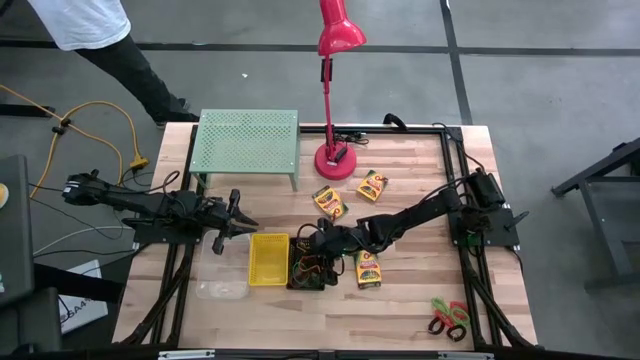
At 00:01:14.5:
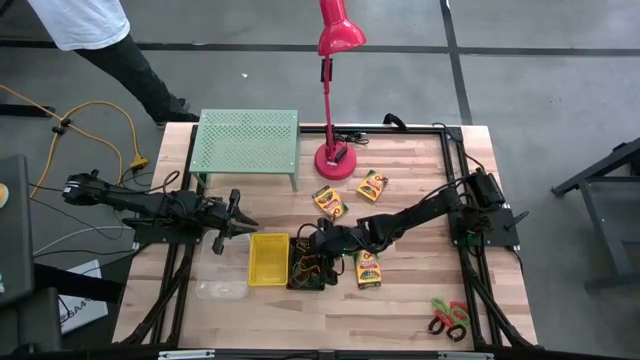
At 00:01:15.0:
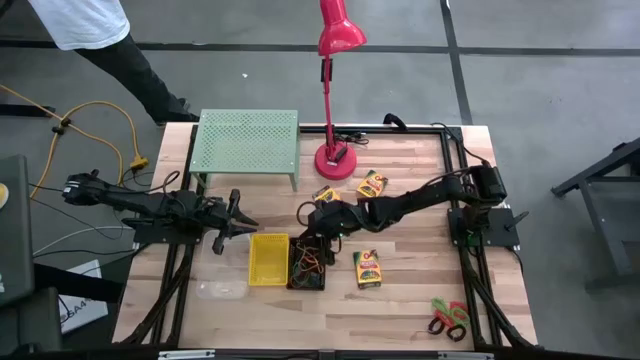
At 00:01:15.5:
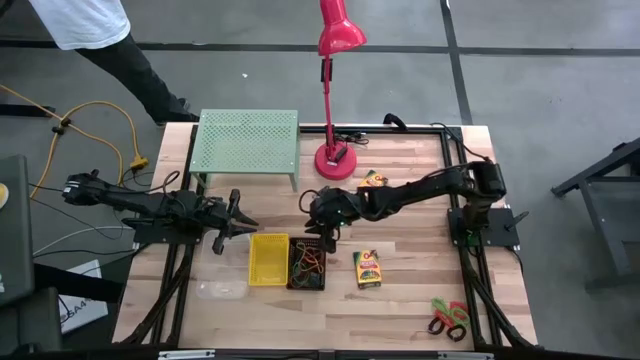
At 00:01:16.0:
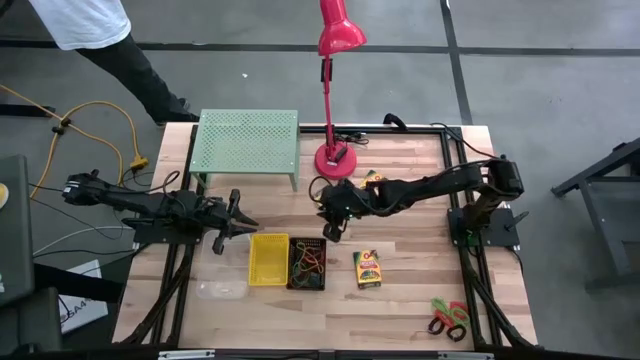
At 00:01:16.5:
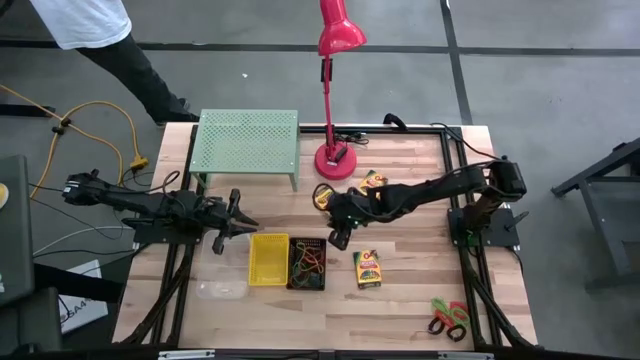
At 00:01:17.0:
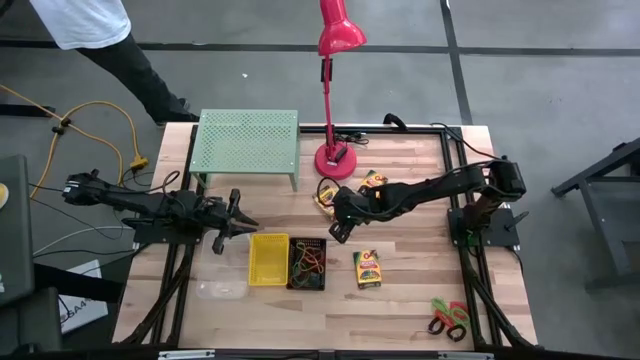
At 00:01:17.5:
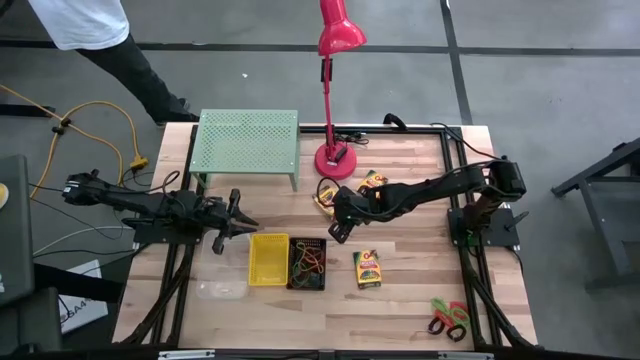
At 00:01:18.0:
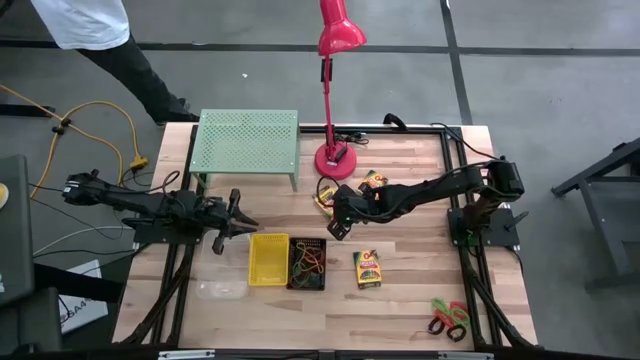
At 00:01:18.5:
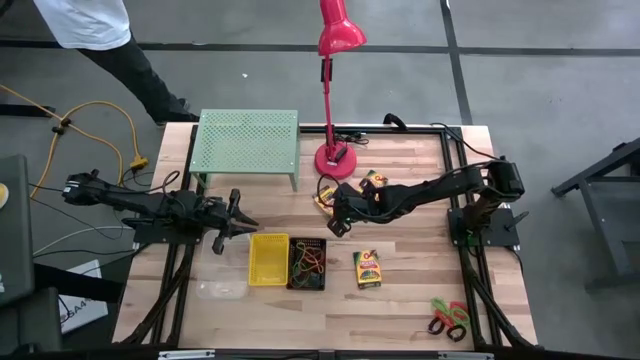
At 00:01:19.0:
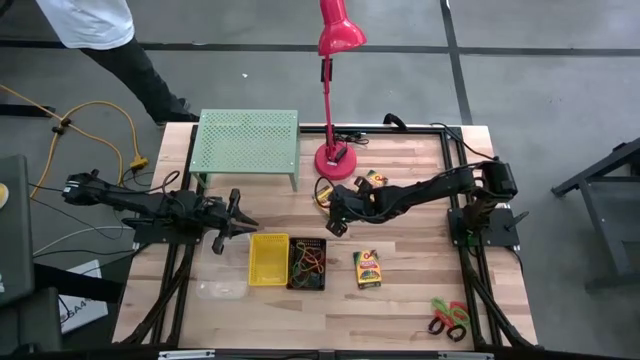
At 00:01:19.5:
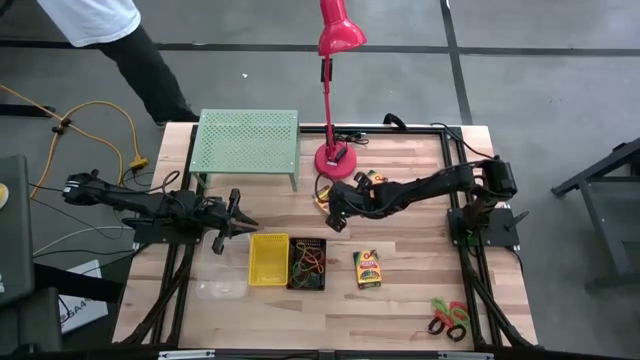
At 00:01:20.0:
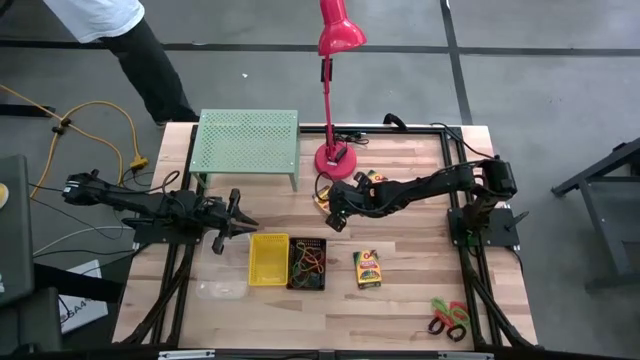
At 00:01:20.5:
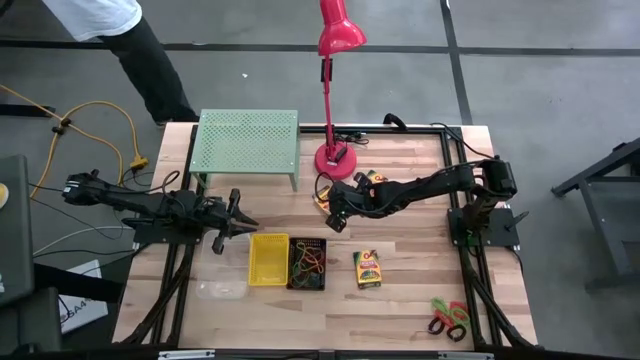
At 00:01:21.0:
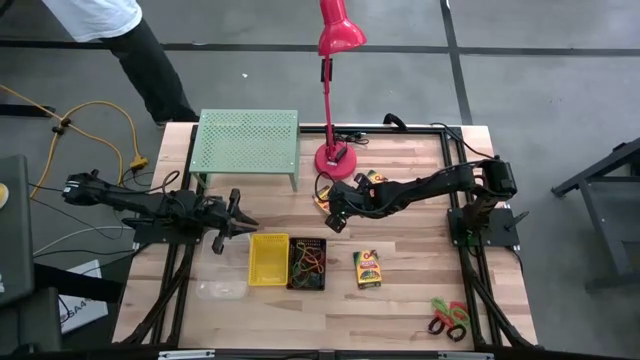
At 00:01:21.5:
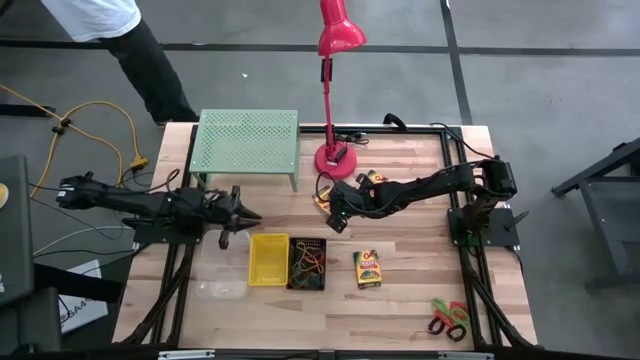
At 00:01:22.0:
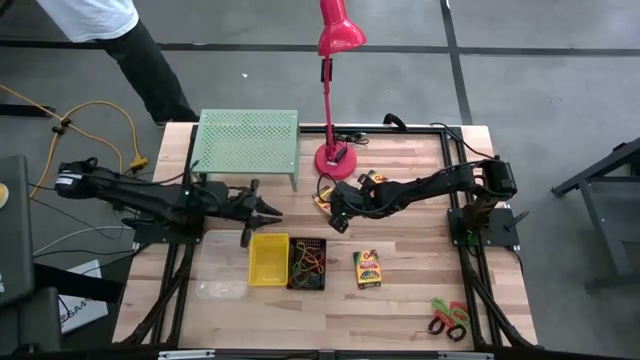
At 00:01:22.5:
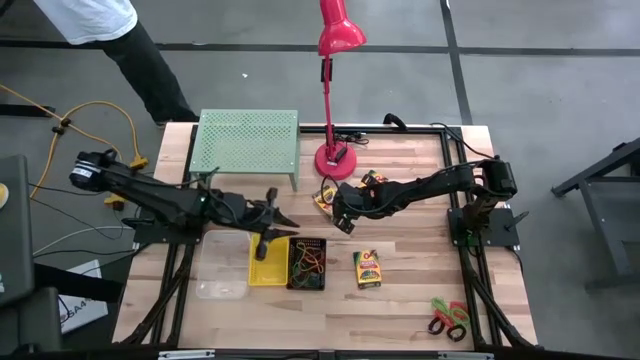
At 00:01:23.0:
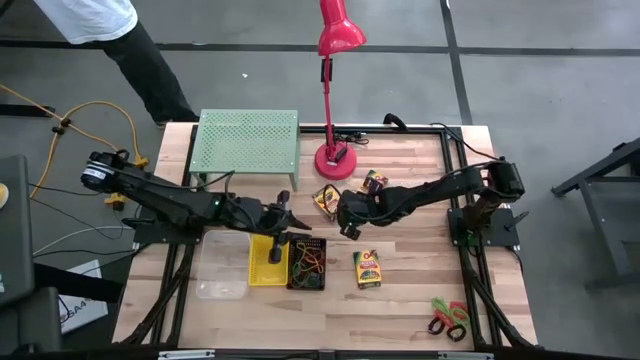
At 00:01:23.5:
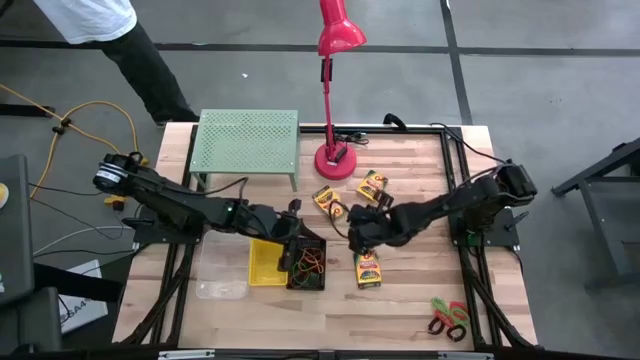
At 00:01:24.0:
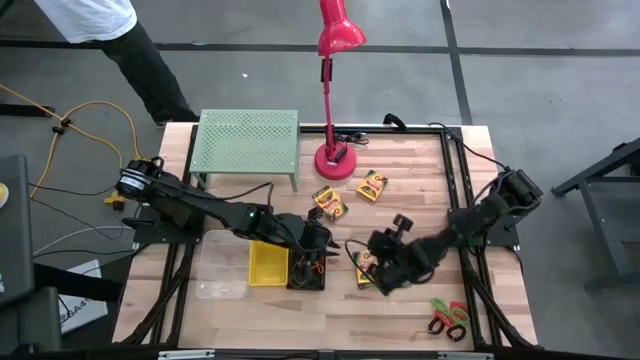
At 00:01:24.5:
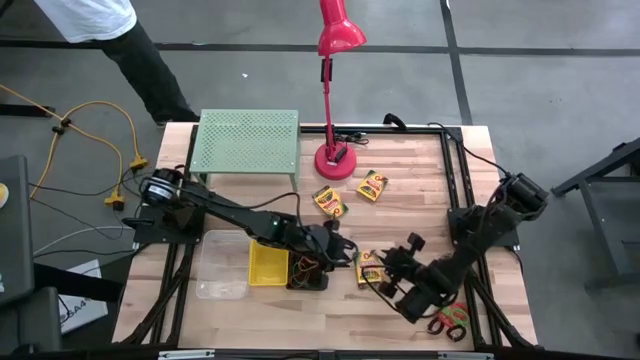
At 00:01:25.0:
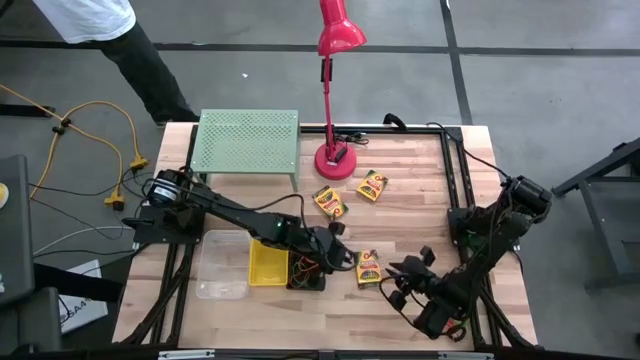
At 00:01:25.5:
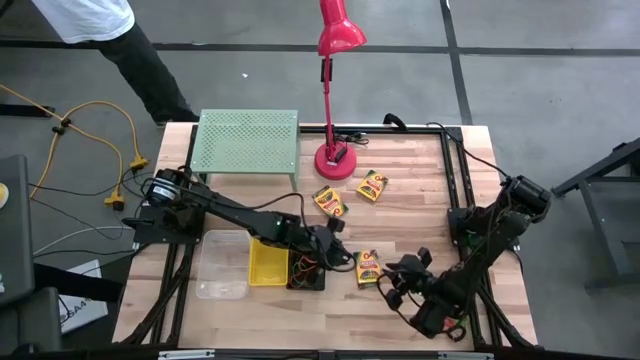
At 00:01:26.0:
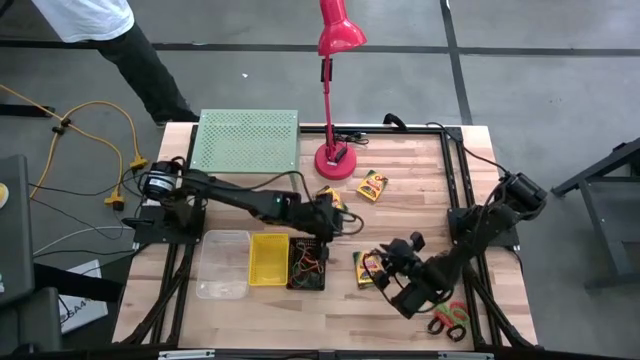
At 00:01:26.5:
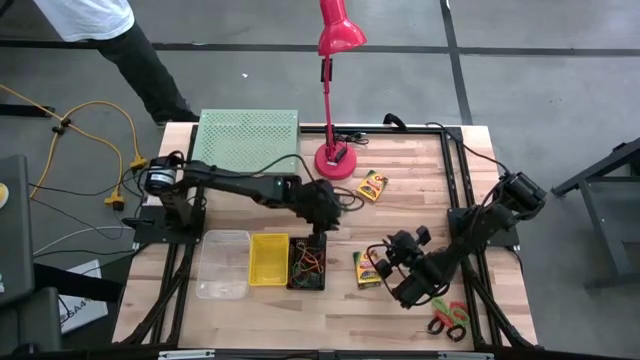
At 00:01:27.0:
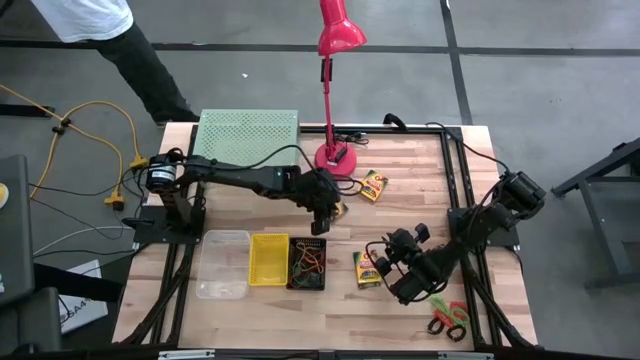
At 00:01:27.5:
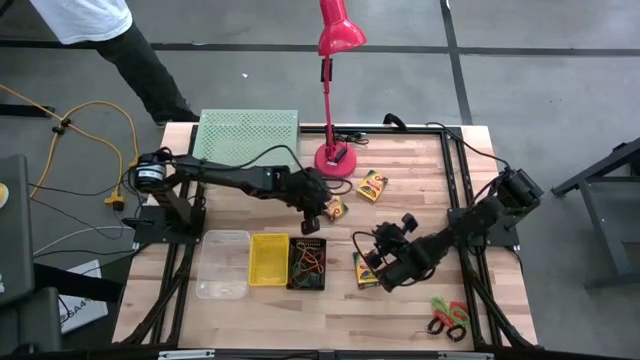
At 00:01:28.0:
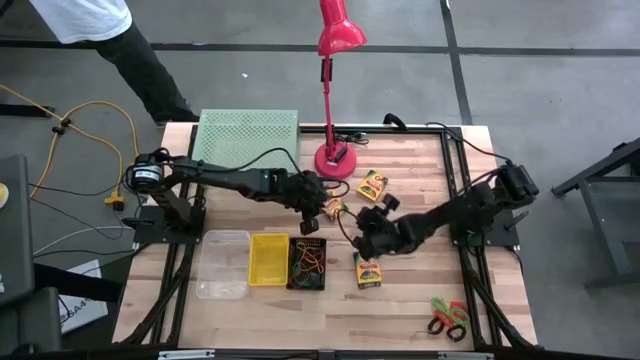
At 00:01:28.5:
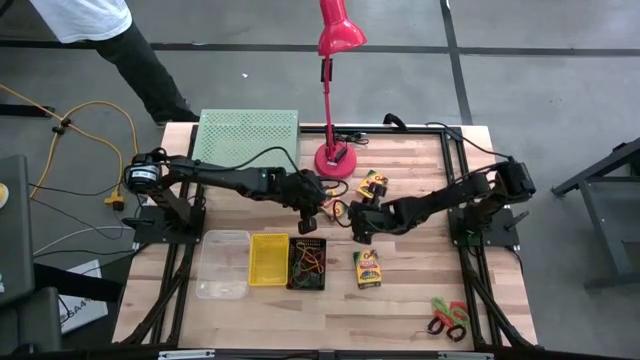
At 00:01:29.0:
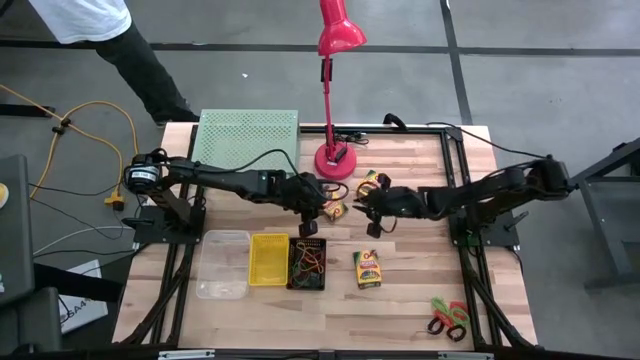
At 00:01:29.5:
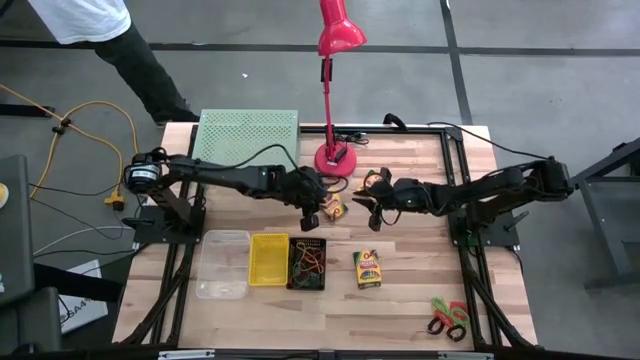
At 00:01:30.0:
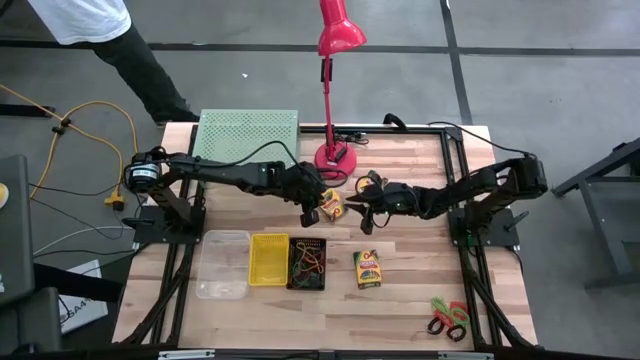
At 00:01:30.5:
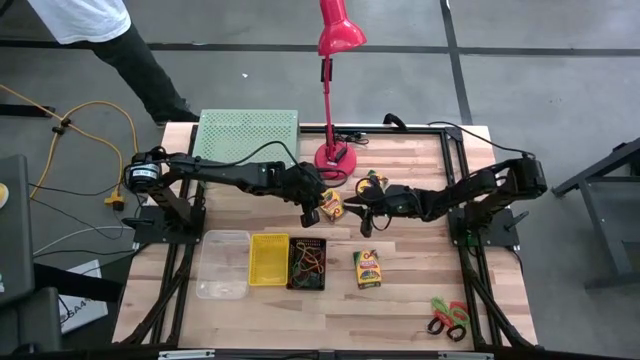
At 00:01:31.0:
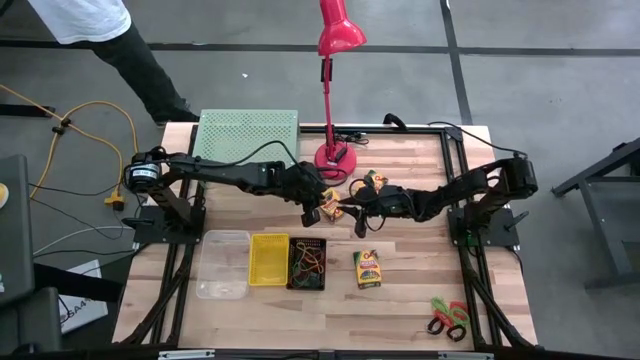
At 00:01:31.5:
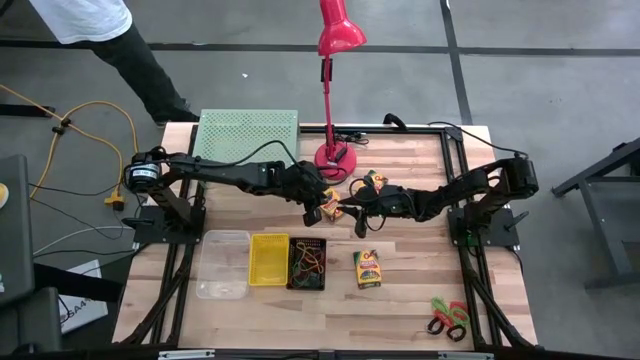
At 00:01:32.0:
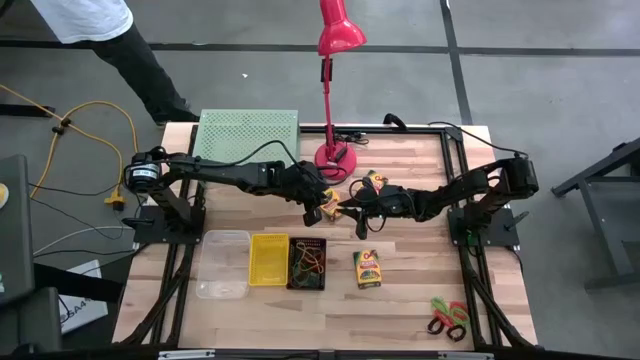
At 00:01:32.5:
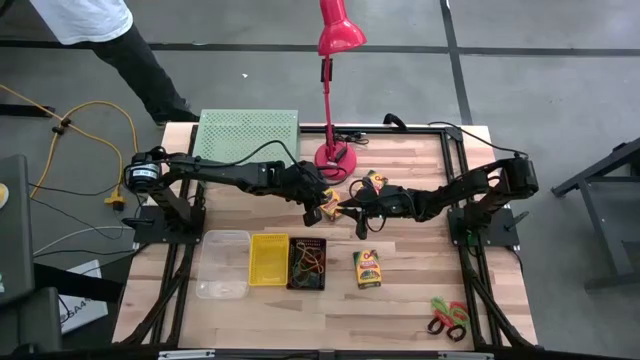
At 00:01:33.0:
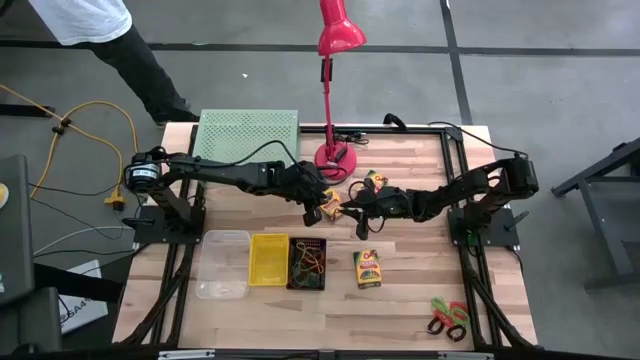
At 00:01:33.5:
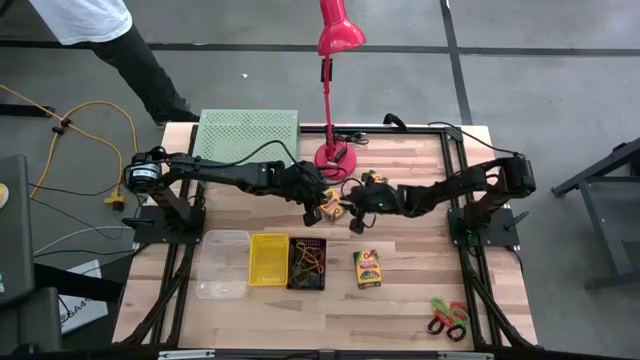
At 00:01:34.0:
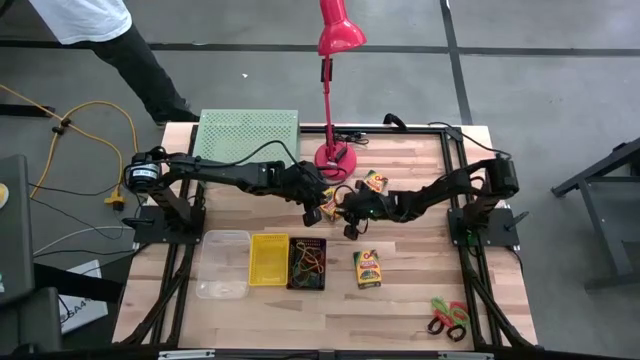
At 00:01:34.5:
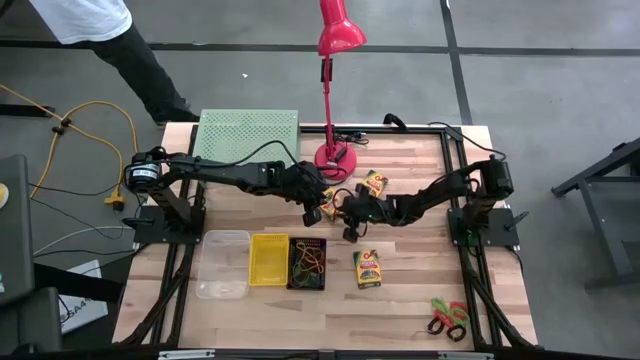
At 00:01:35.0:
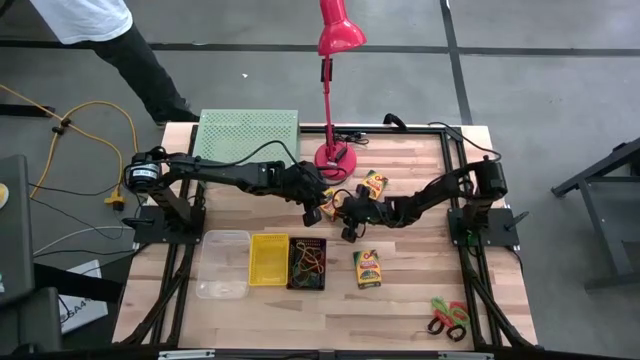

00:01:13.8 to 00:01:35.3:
Task: Pick & Place Office Desk Supplies
Put the crayon box into the transparent bin
